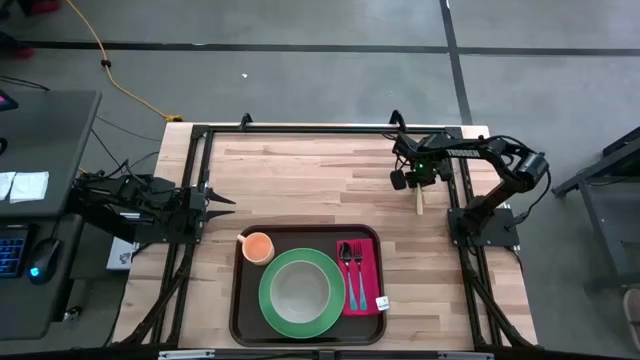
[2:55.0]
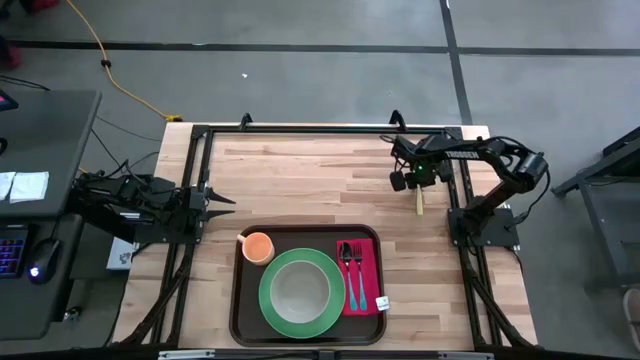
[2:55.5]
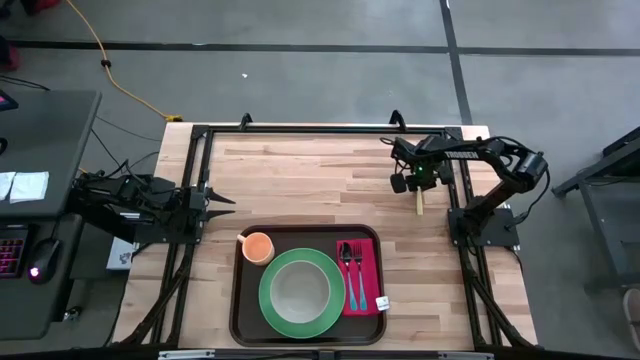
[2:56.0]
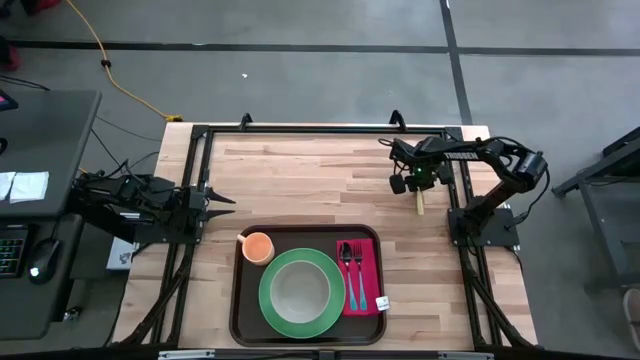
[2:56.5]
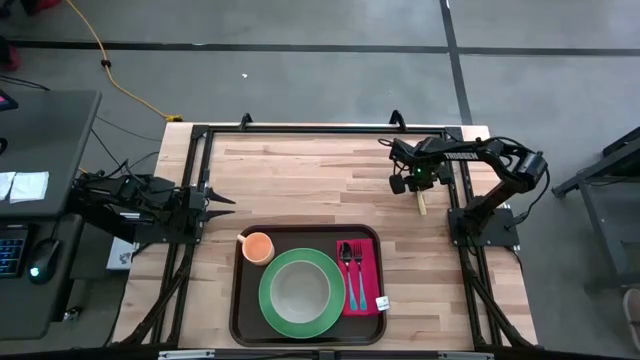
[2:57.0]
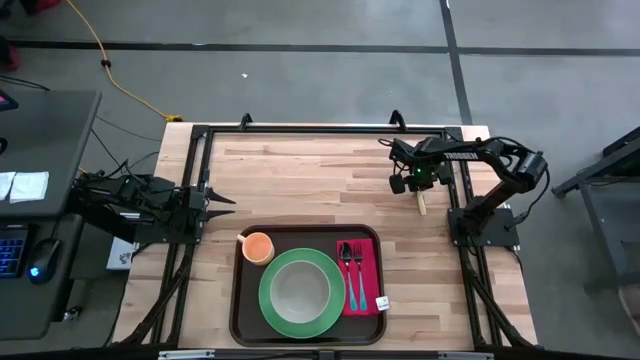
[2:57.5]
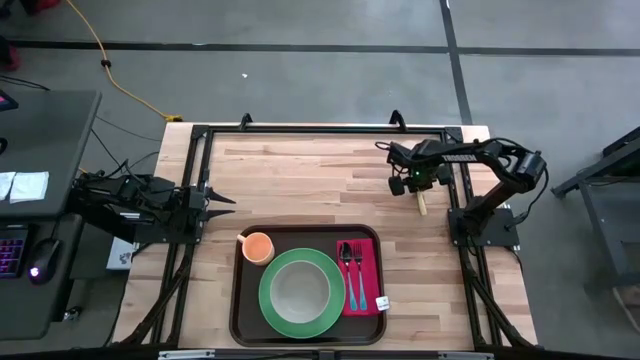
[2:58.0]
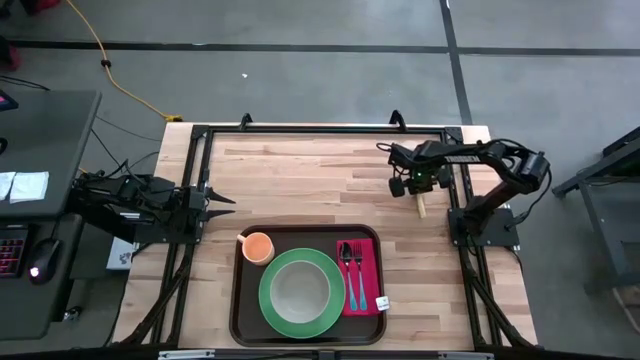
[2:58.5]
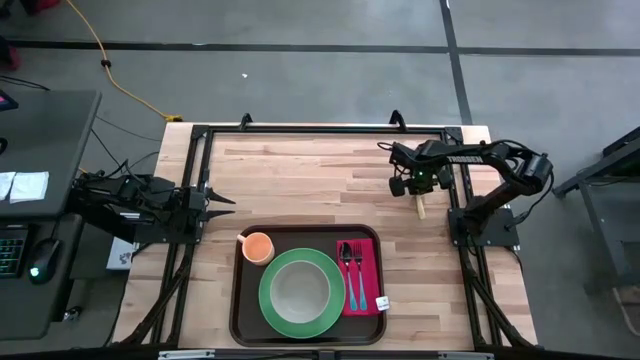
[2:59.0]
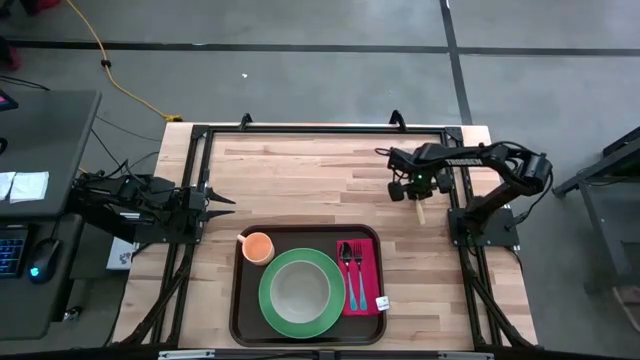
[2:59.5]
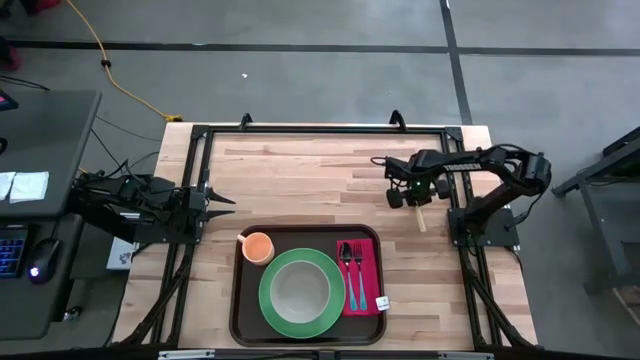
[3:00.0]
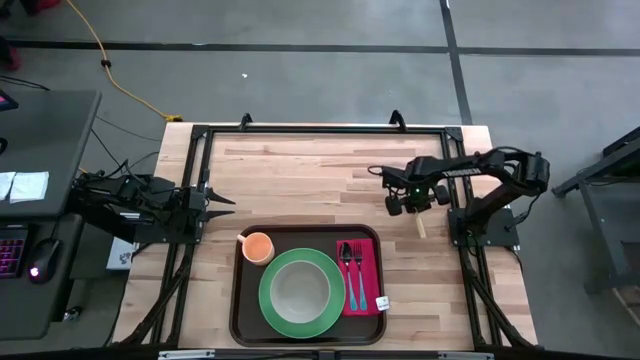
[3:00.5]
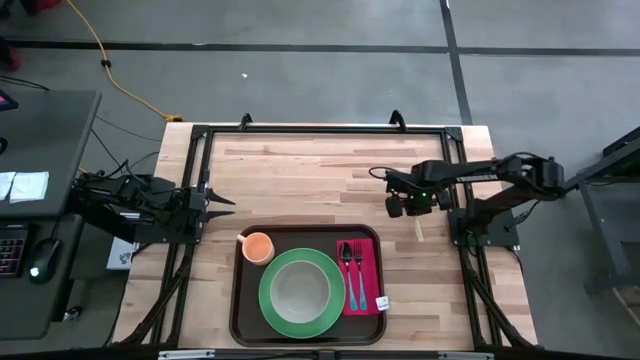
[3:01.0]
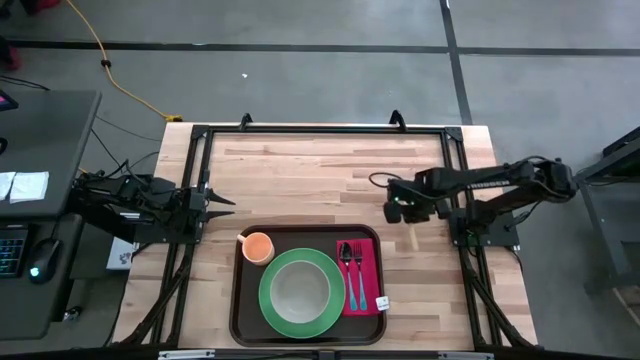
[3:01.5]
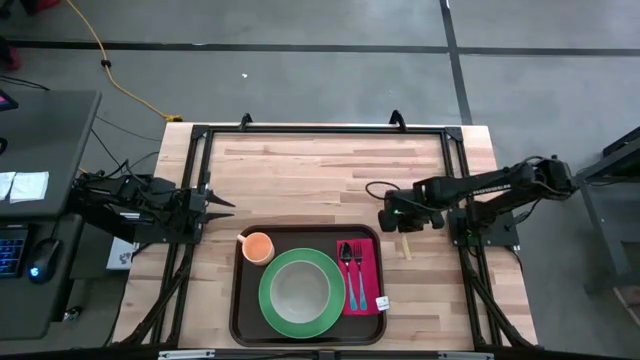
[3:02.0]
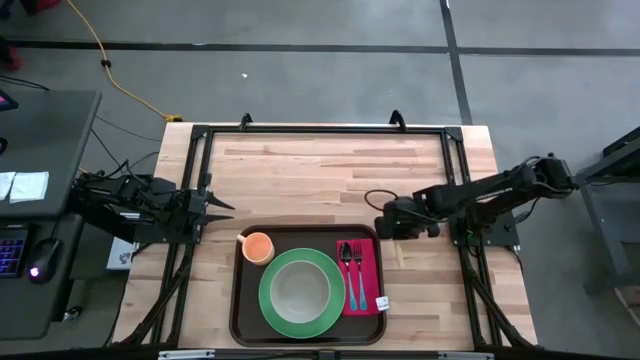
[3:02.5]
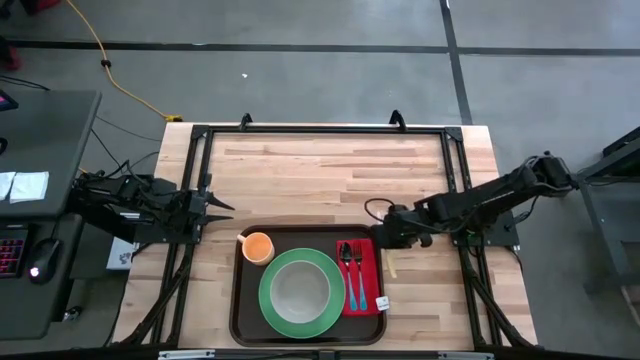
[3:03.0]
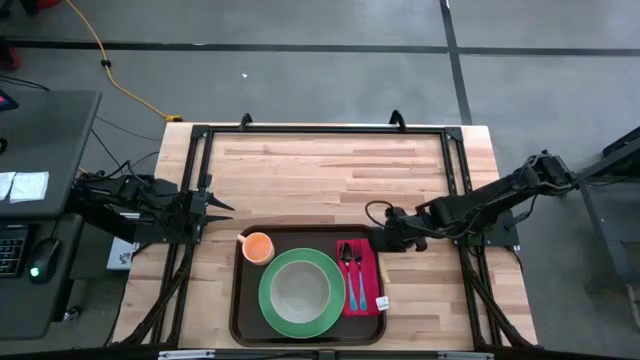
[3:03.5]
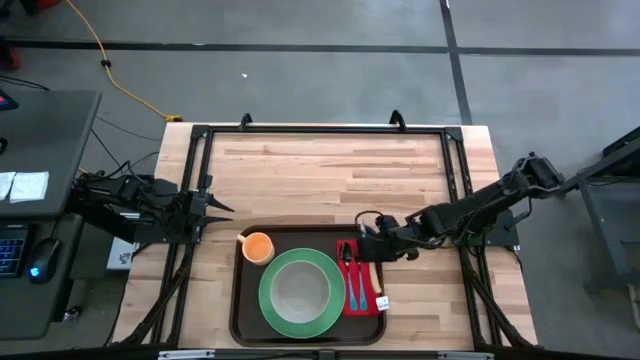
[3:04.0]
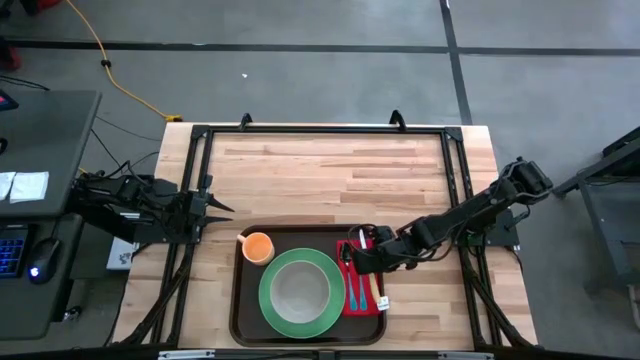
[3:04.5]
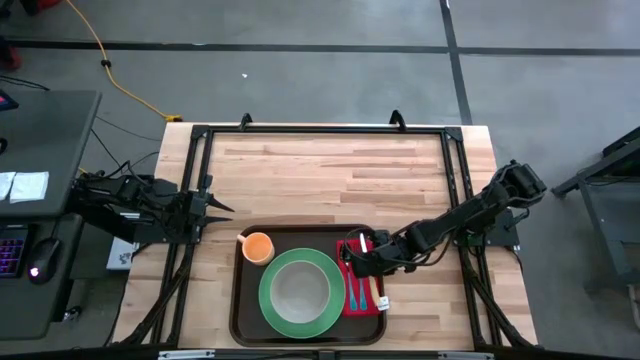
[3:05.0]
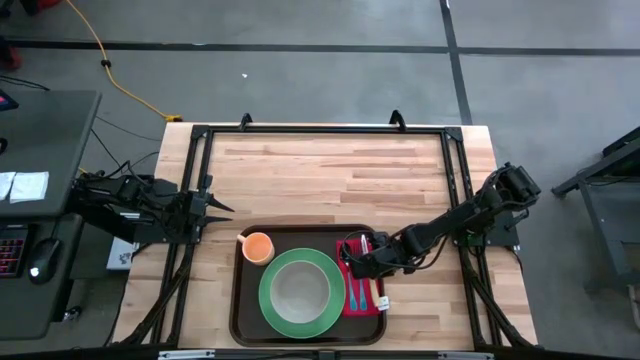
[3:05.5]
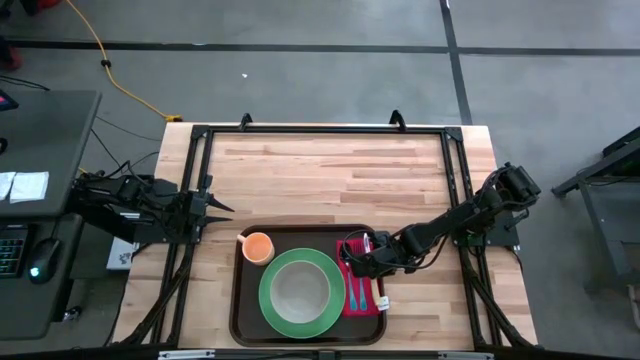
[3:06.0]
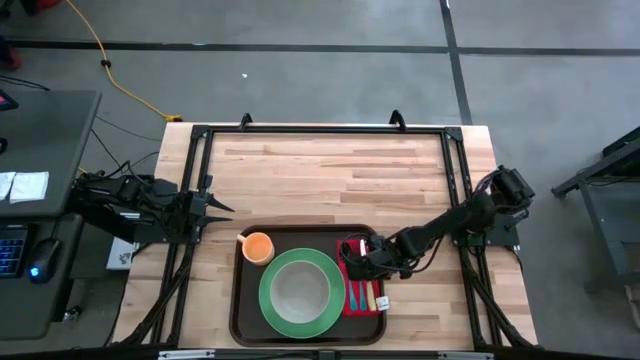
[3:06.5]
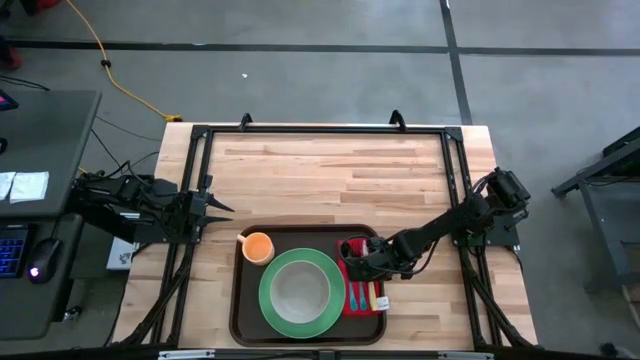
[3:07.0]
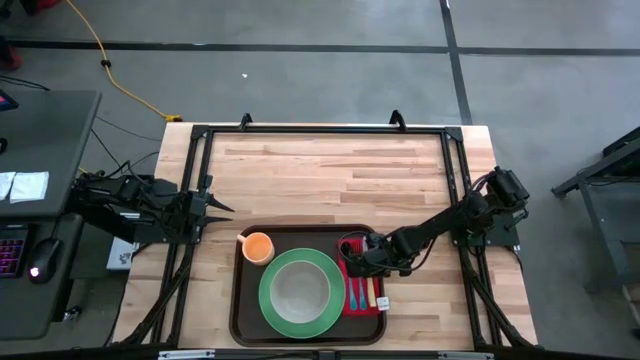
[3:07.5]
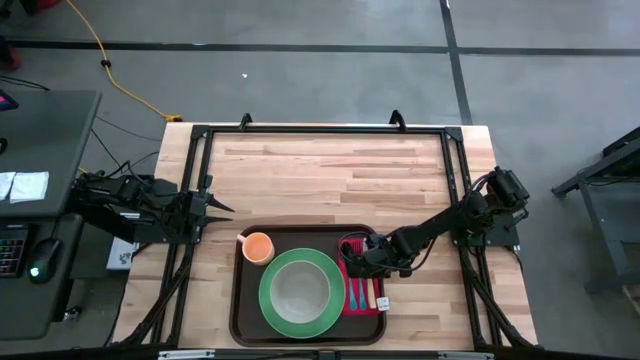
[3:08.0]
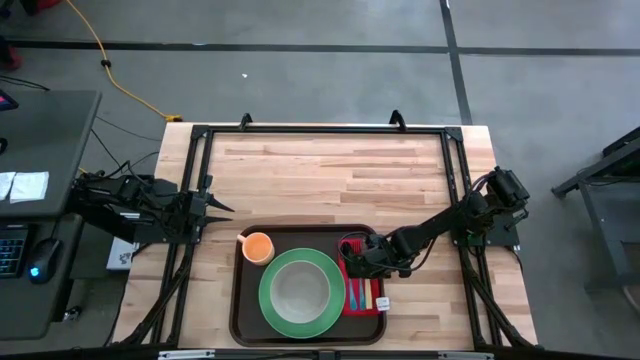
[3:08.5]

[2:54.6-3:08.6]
Task: Set up tray
Put the yellow knife on the red napkin

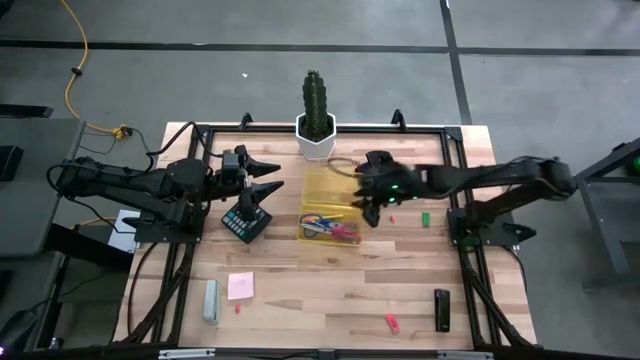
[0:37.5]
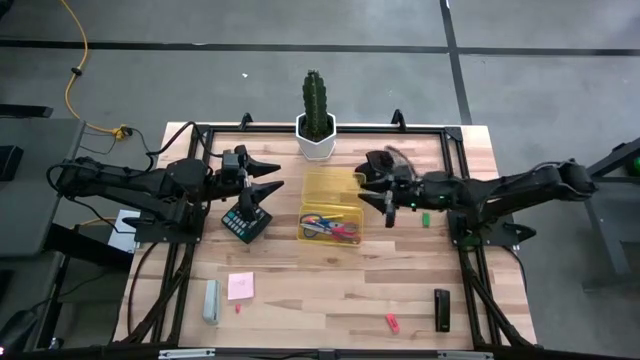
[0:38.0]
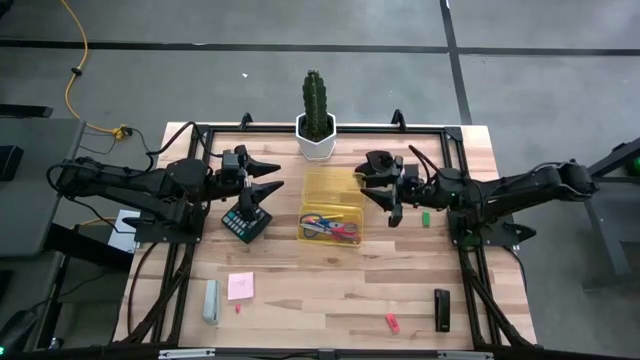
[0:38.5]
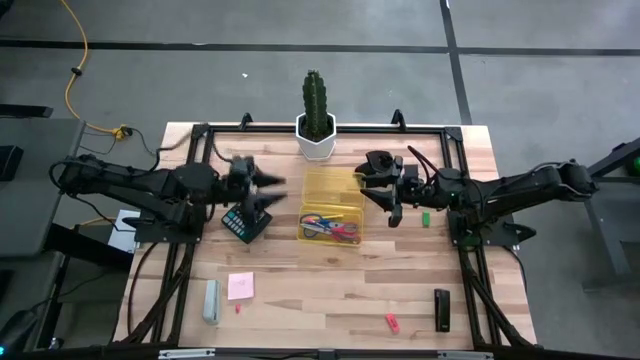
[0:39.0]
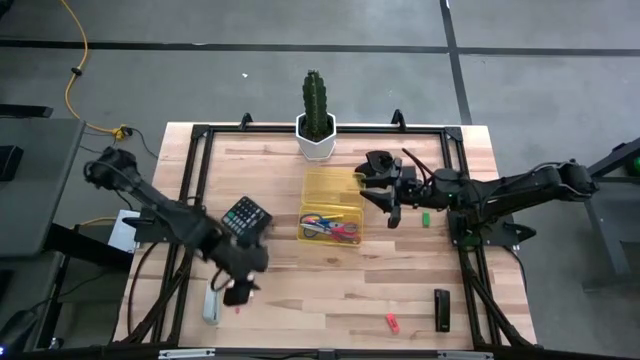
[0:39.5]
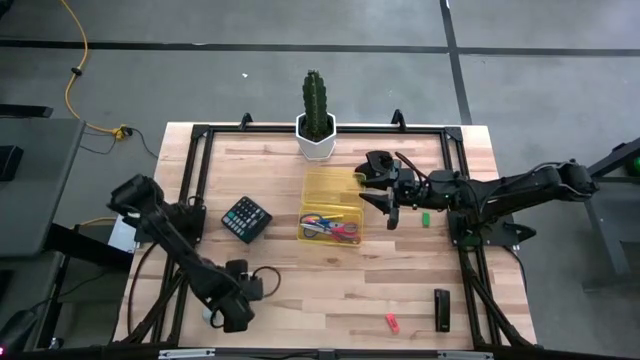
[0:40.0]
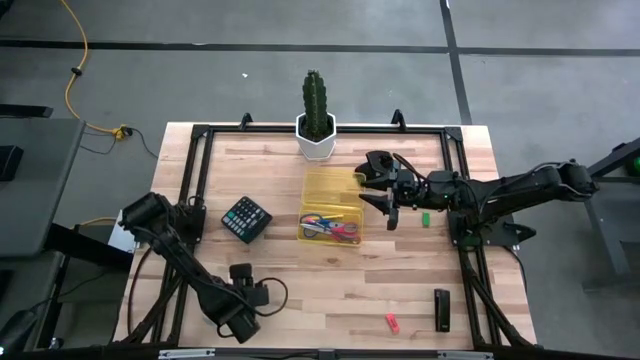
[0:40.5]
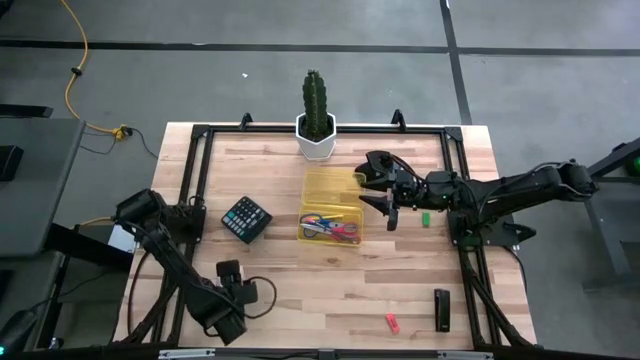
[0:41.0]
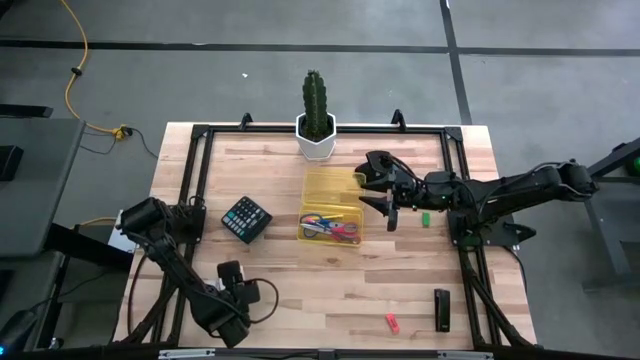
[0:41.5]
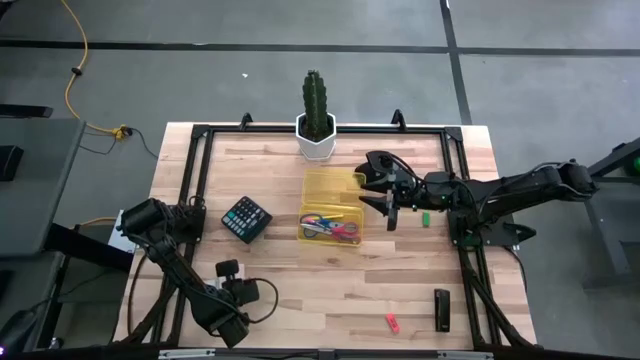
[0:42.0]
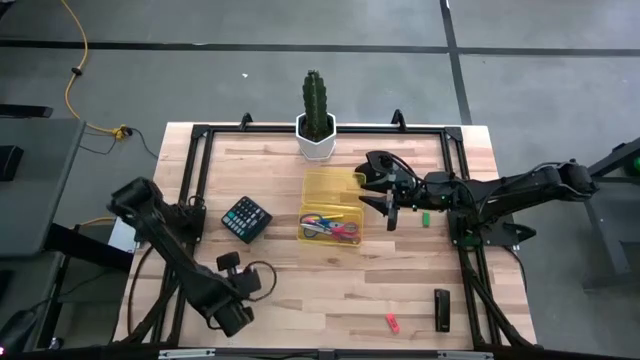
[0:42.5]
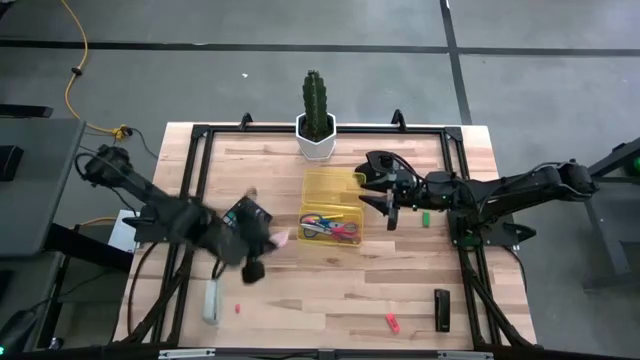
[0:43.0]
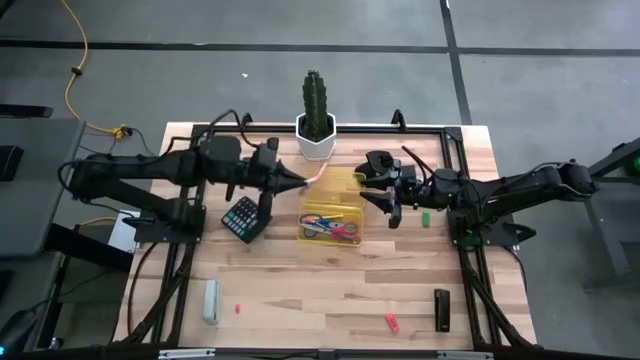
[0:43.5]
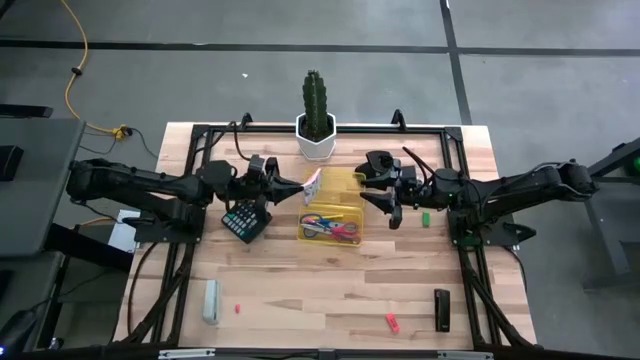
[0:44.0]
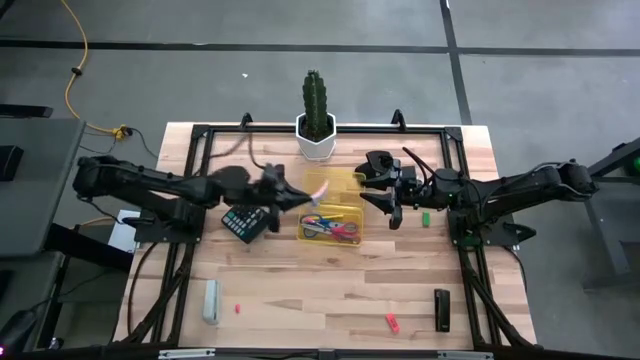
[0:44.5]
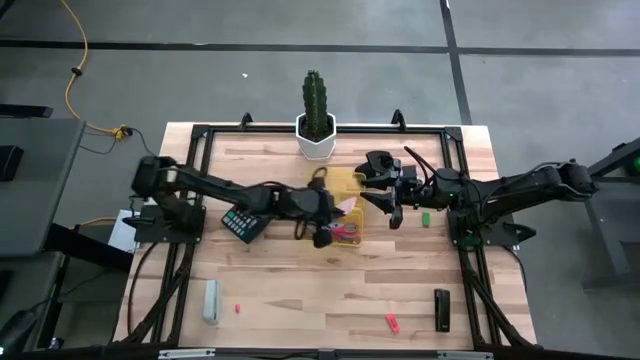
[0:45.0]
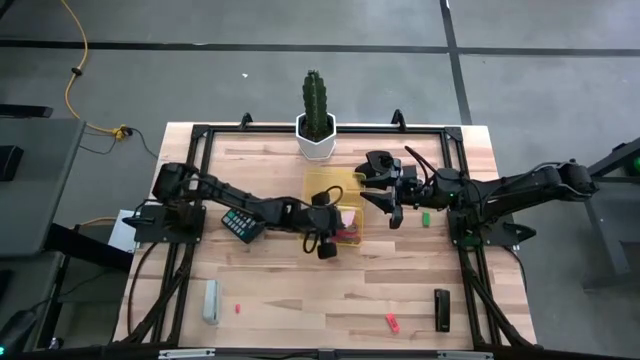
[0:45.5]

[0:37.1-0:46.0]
Task: Pack school essentials
Put the sticky note into the supply box
